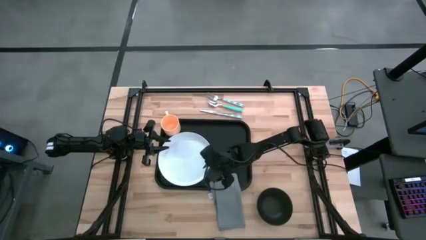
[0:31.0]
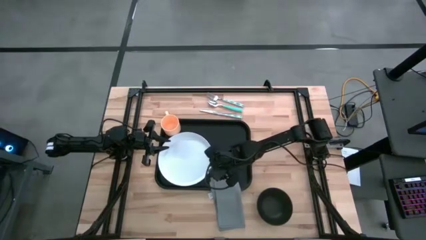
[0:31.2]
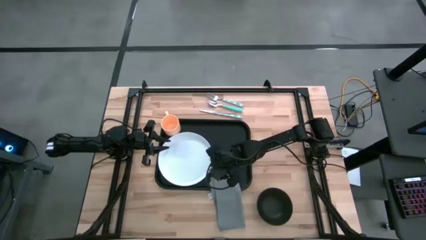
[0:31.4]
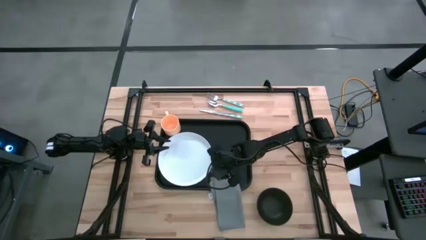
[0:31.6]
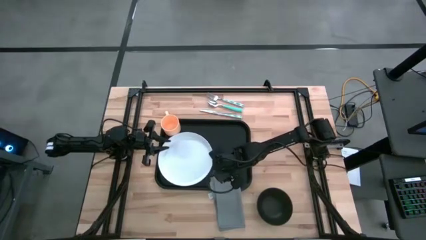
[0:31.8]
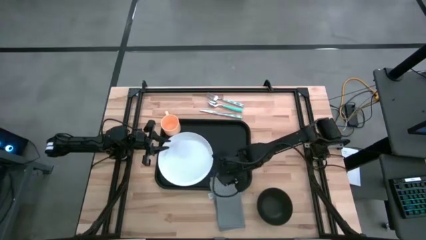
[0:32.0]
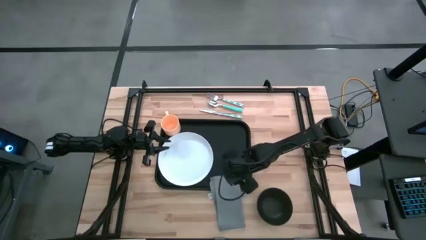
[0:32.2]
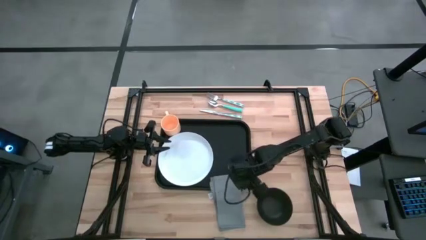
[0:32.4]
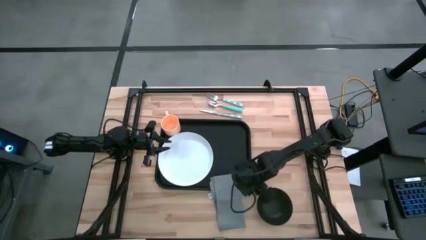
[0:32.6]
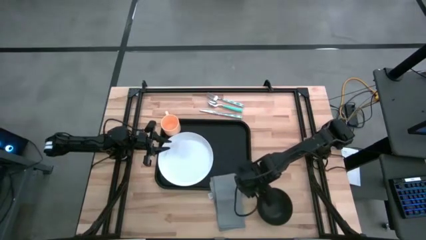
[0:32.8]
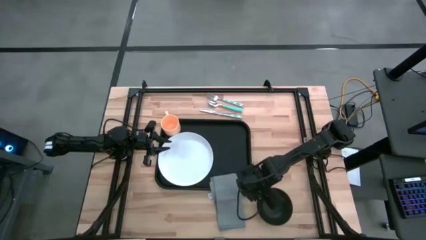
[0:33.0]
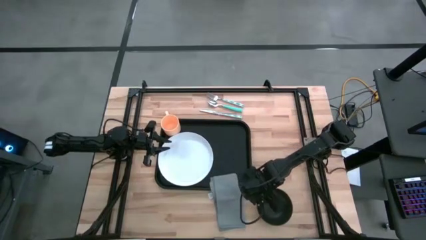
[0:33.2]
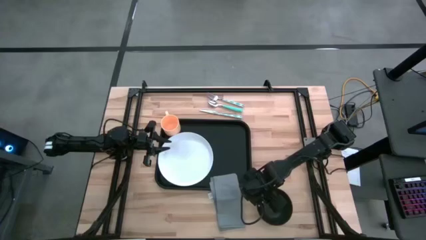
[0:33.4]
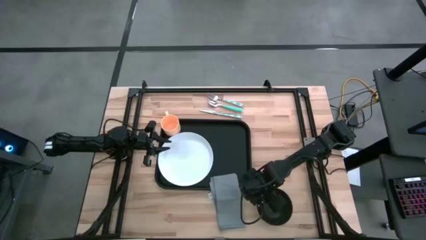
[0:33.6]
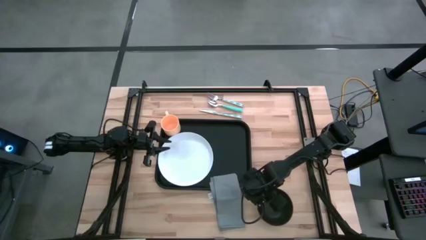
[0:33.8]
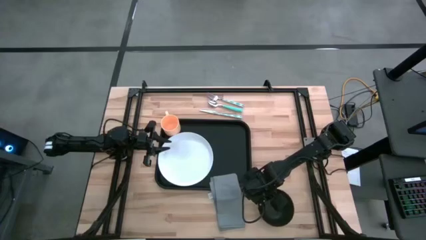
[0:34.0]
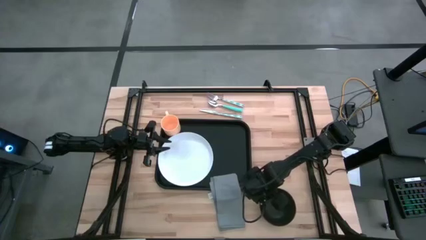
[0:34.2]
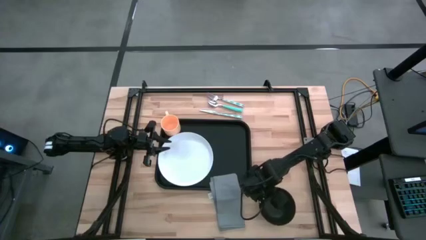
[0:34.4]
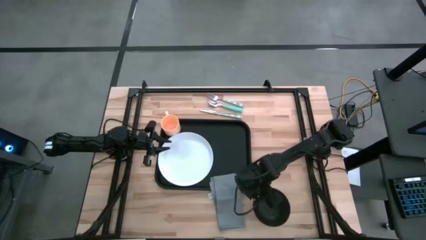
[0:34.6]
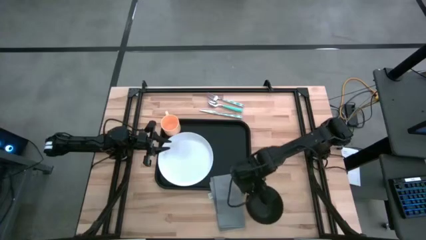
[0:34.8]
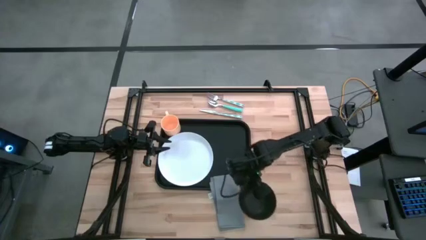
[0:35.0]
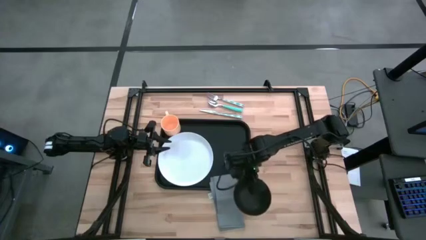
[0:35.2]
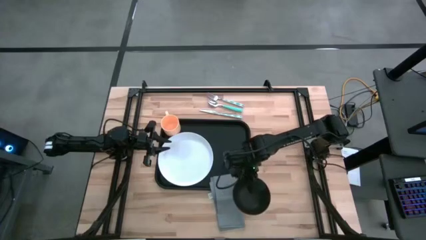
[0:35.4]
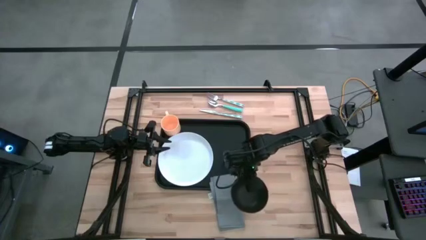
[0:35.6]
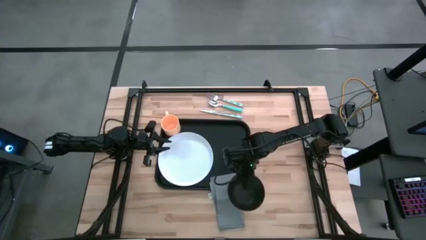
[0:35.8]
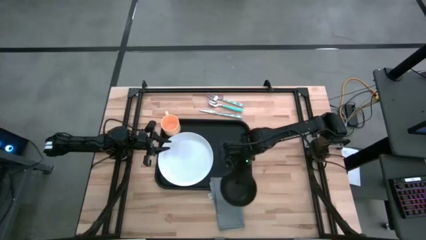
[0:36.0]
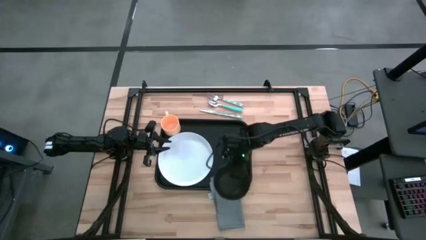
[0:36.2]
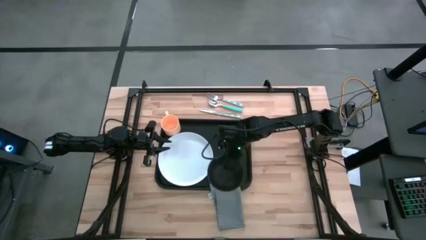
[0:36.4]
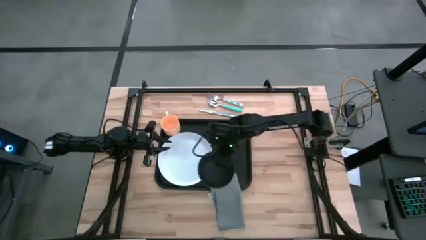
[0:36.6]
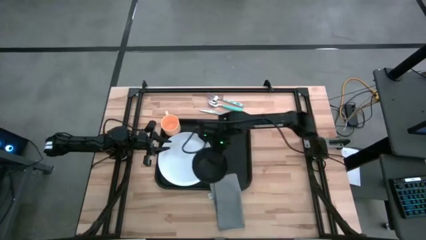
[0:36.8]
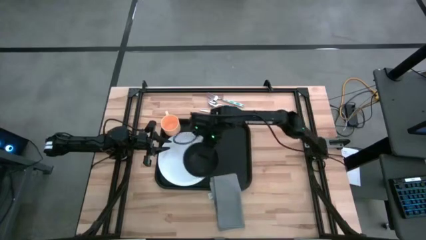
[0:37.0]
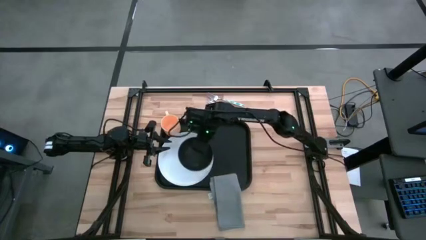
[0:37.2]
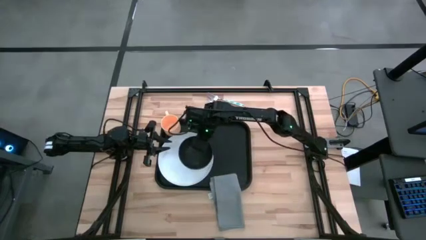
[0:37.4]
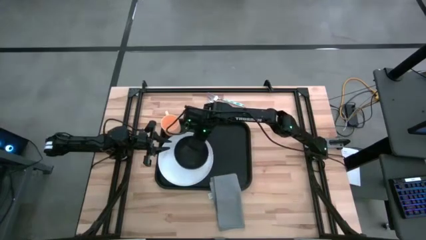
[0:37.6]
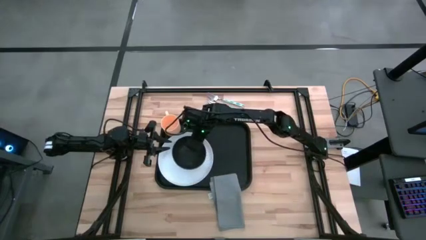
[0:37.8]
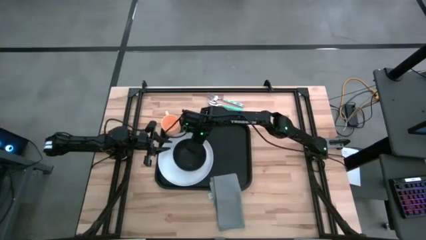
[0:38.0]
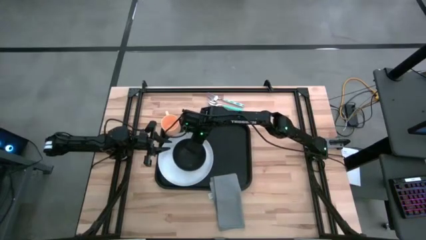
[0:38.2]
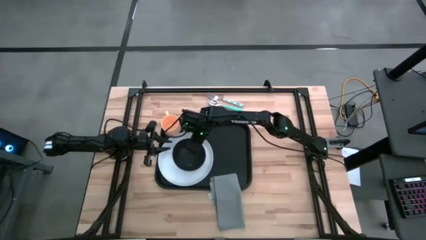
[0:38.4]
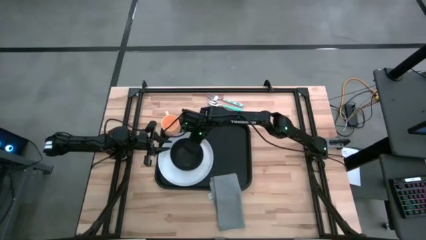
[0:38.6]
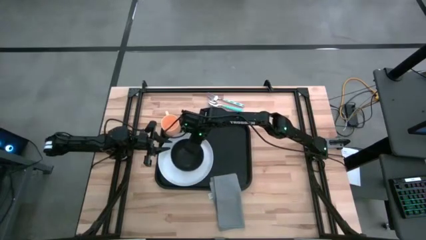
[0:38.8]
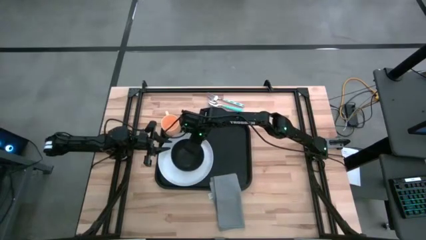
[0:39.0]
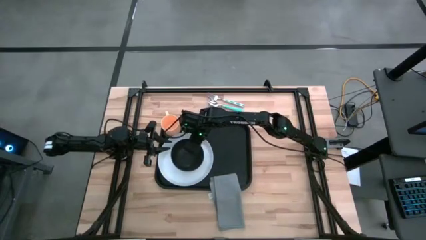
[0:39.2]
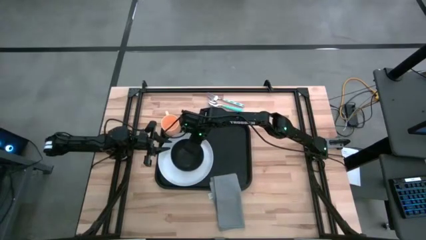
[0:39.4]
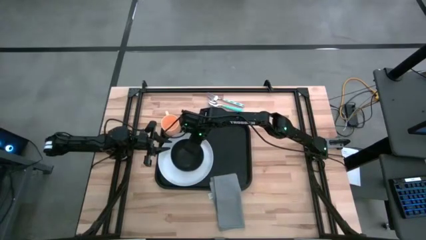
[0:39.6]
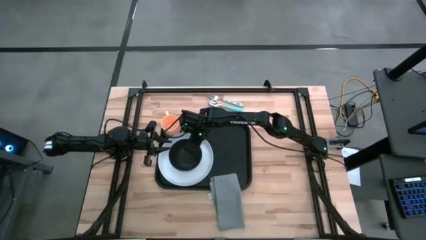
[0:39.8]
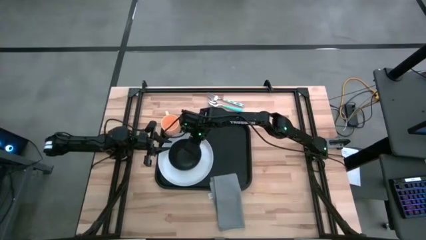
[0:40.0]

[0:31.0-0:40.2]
Task: Set up tray
Put the black bowl on the white plate on the black table tray

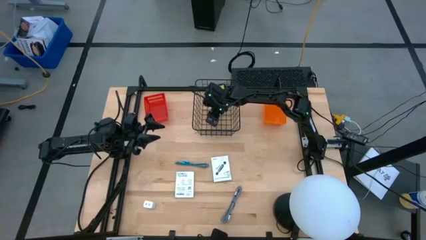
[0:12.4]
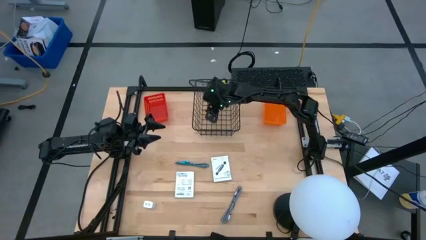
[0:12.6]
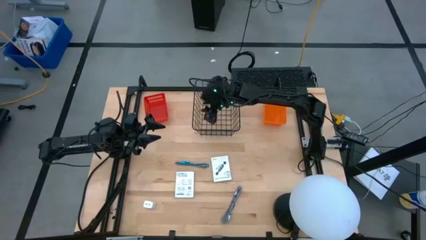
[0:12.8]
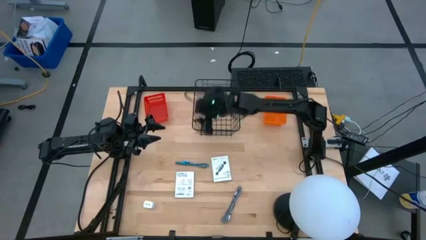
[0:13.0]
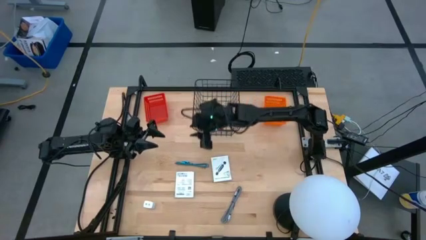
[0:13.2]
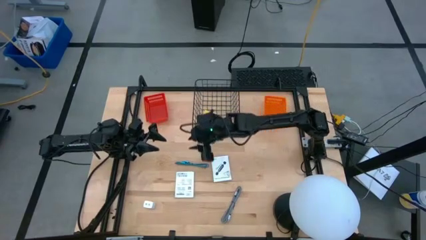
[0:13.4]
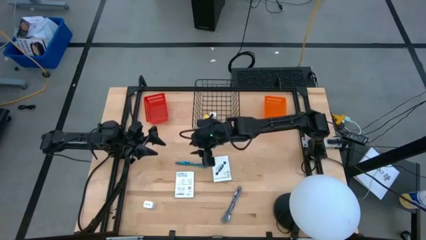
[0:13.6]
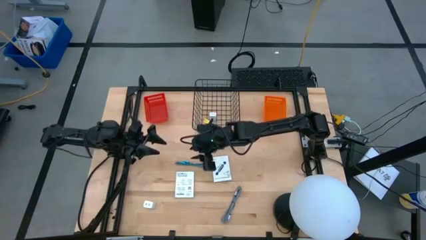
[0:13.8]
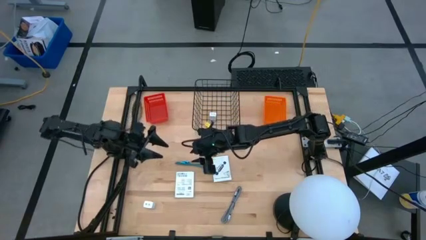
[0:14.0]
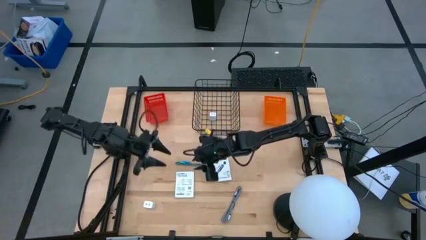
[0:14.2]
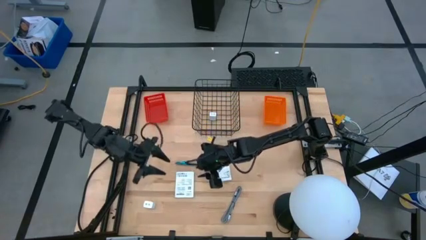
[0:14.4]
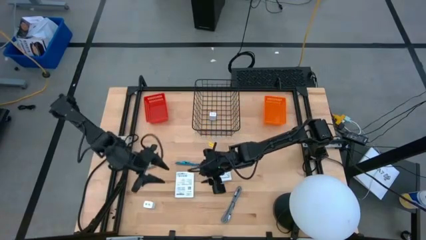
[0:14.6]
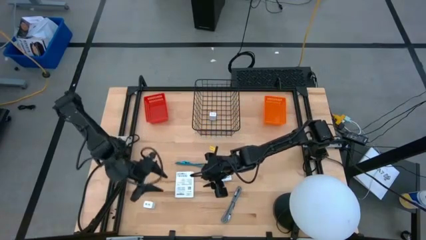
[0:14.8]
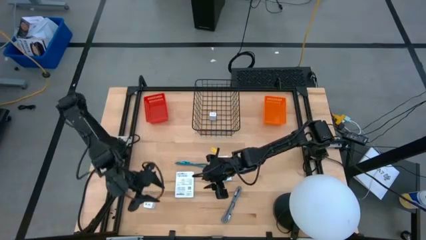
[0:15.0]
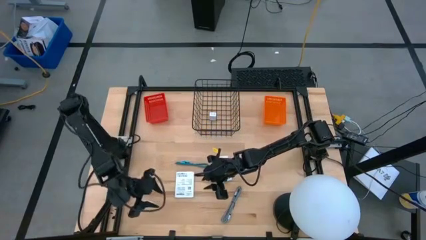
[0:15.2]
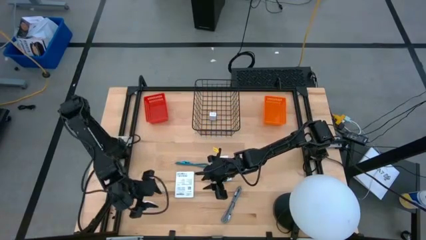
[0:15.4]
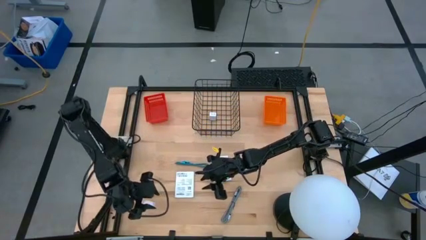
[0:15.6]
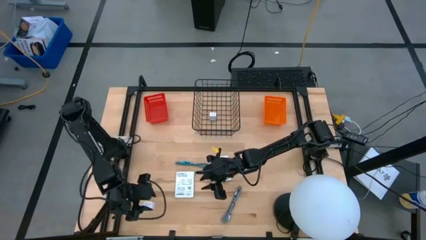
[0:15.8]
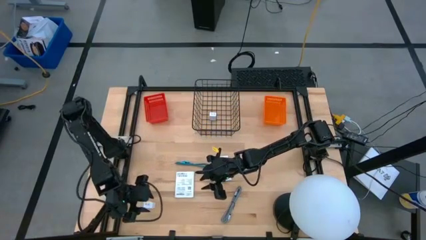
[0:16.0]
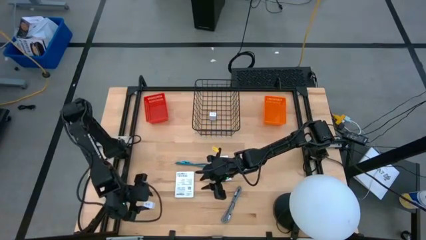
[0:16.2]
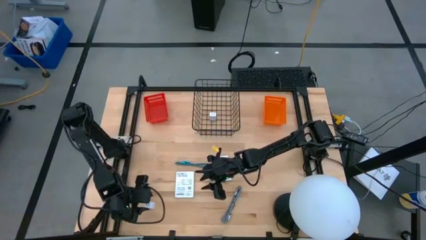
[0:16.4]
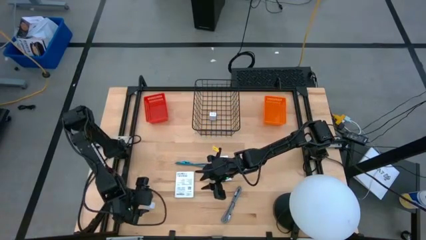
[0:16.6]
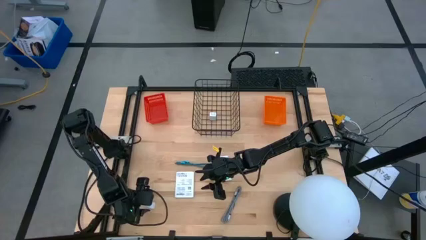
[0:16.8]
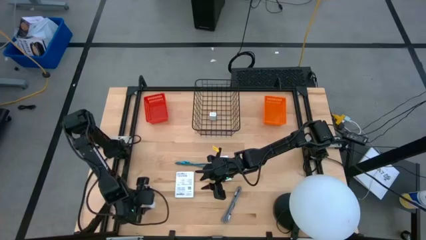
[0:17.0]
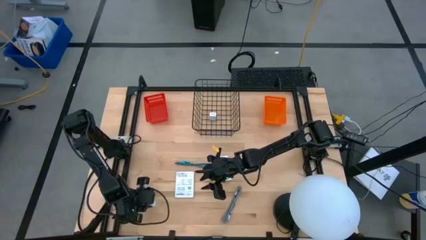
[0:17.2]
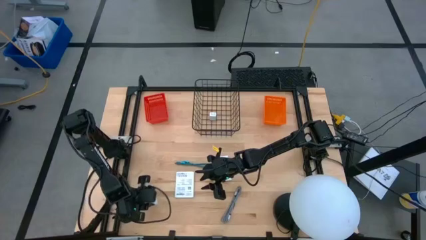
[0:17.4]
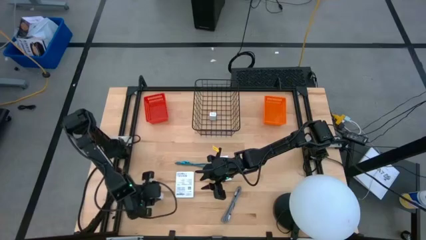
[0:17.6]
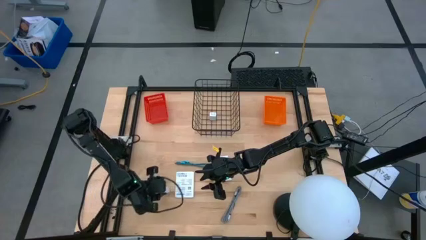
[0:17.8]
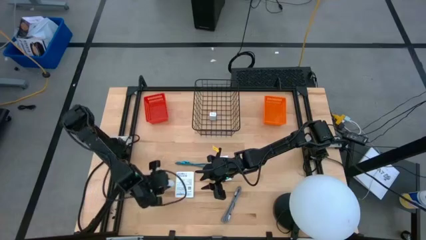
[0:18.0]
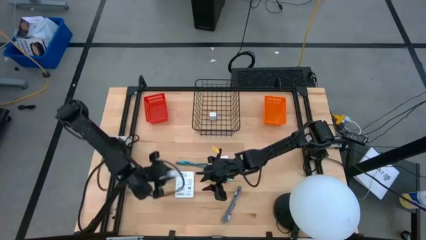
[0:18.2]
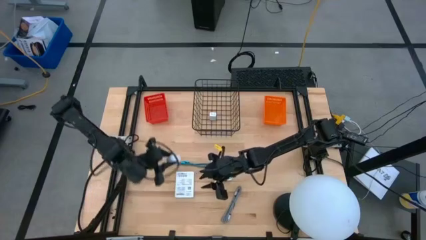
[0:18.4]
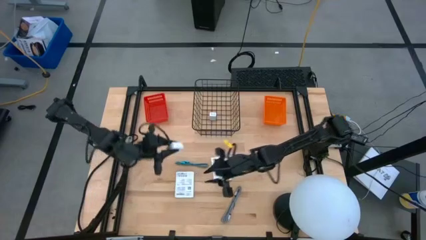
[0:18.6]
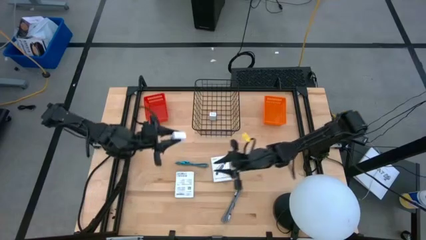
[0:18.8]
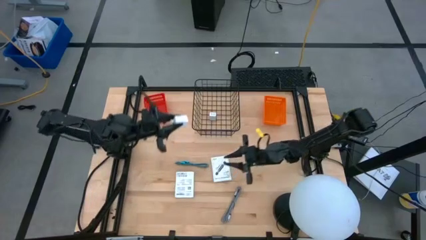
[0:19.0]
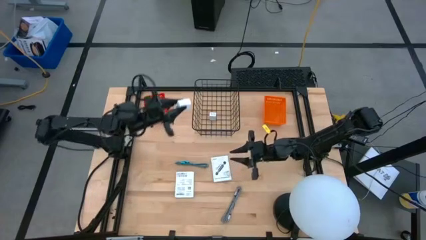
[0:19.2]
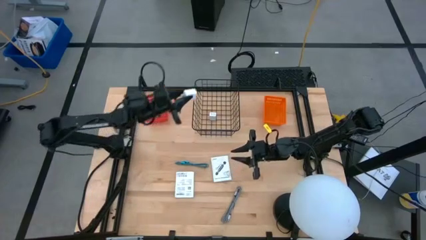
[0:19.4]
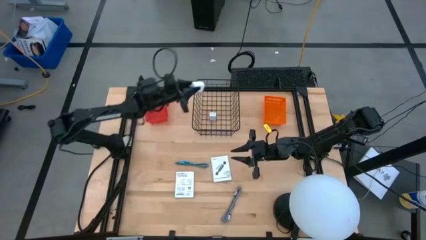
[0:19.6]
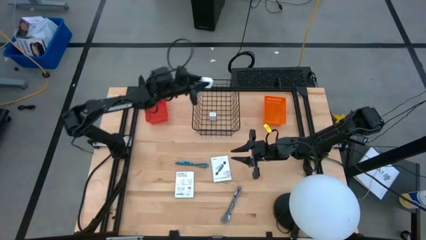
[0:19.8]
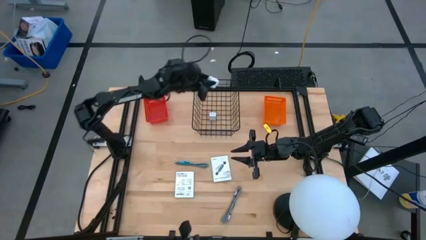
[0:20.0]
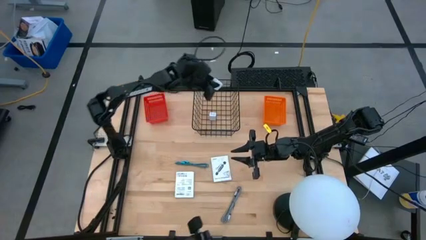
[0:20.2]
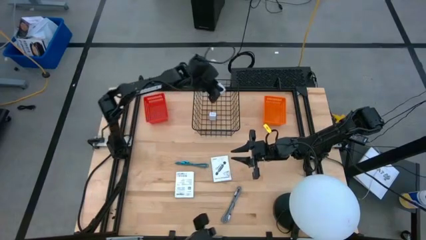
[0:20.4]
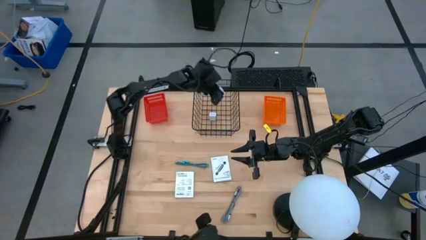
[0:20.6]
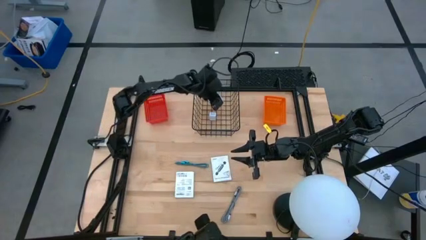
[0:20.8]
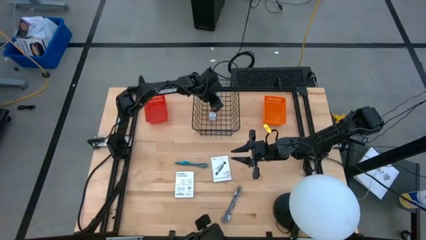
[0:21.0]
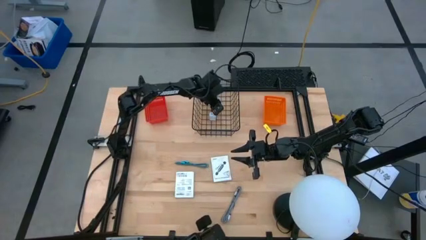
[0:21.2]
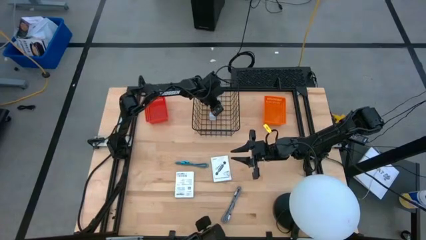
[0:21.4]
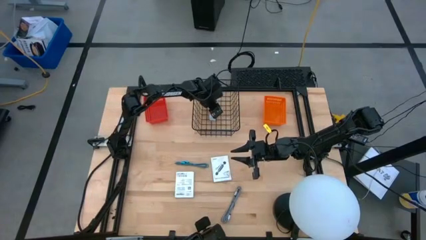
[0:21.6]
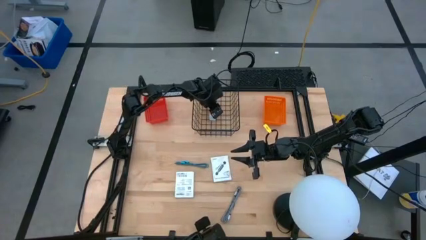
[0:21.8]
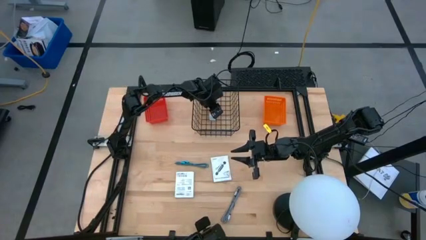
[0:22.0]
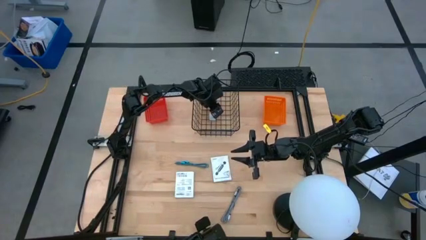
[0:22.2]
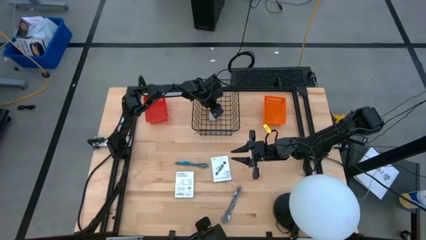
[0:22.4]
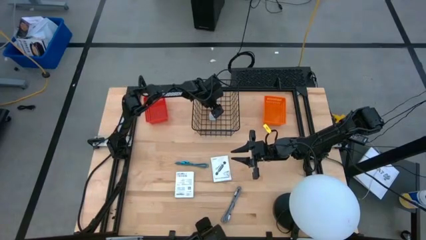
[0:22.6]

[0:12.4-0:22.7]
Task: Pick and place items into bin
Put the white charger adapter into the black wire basket
